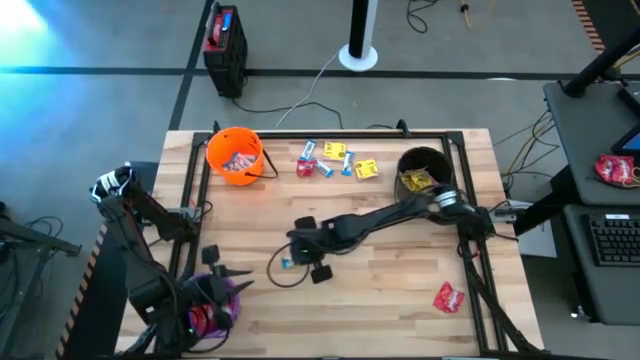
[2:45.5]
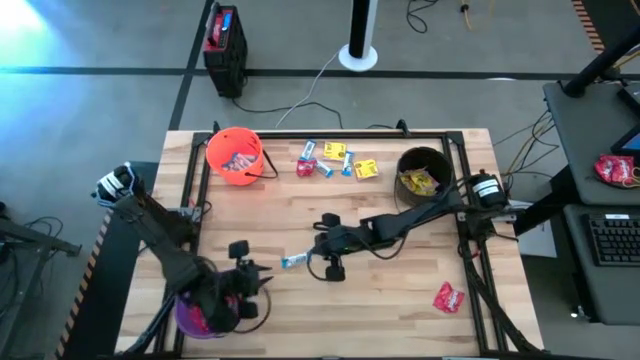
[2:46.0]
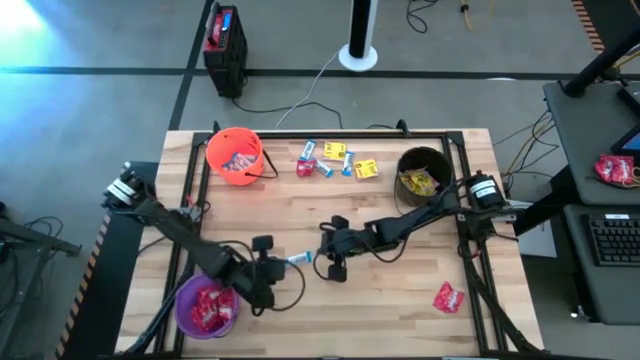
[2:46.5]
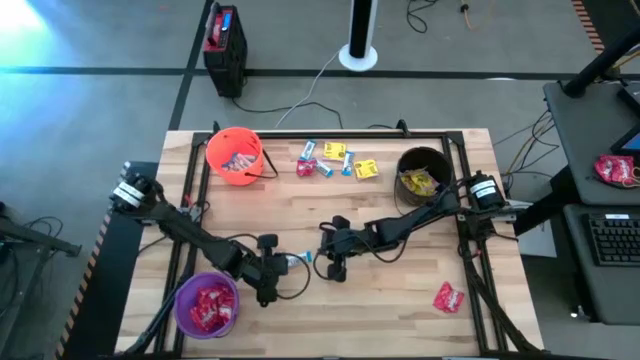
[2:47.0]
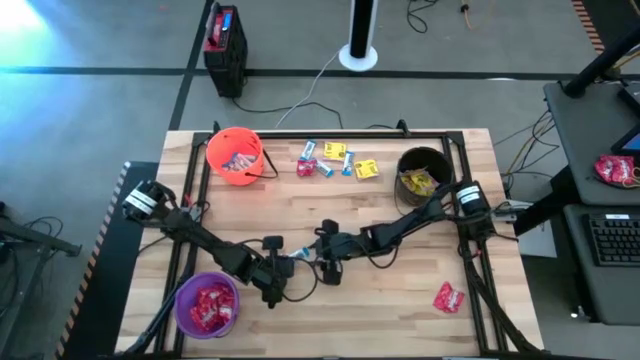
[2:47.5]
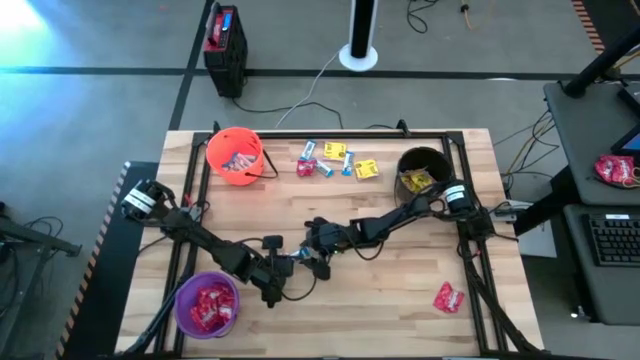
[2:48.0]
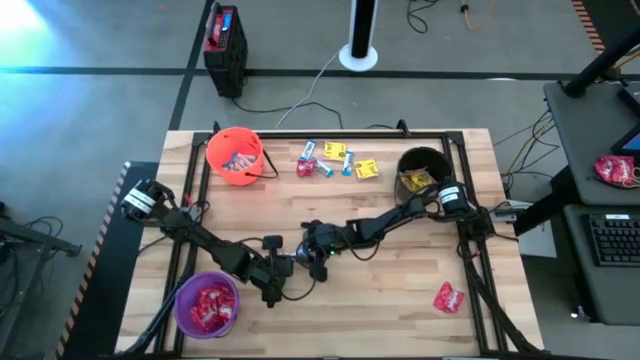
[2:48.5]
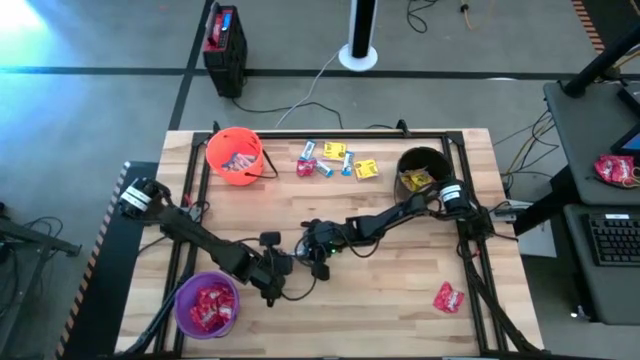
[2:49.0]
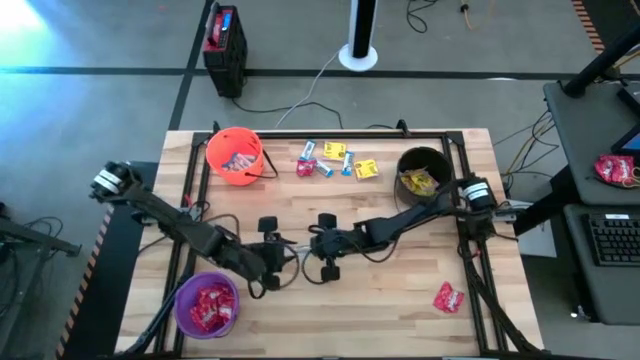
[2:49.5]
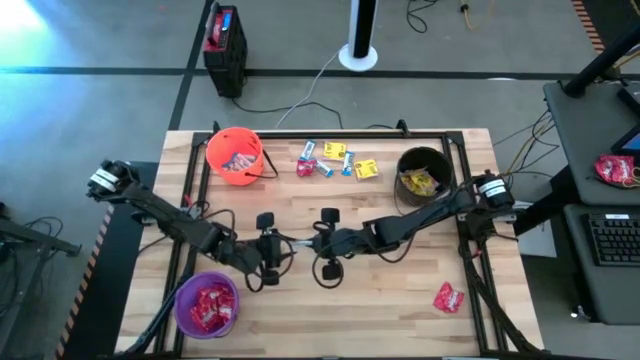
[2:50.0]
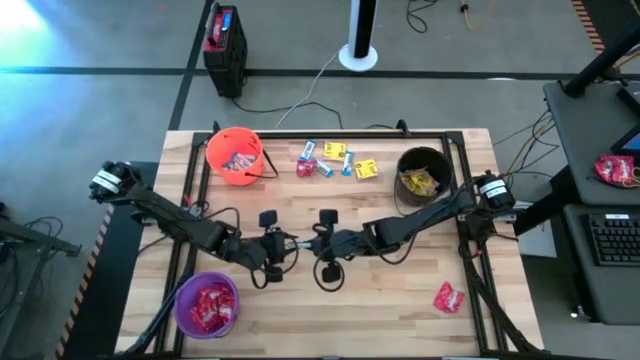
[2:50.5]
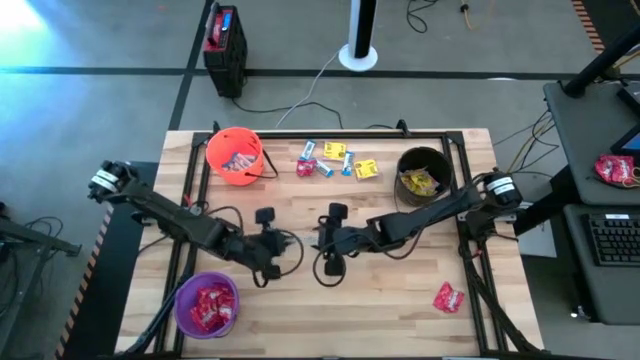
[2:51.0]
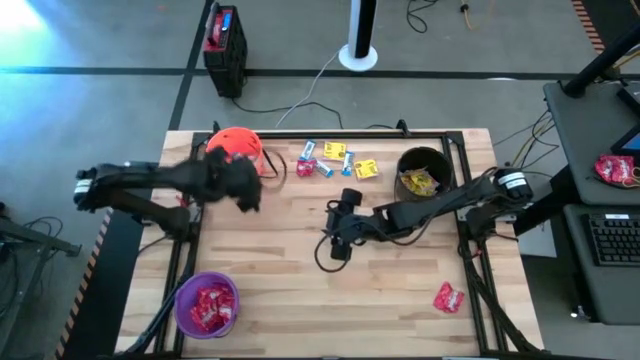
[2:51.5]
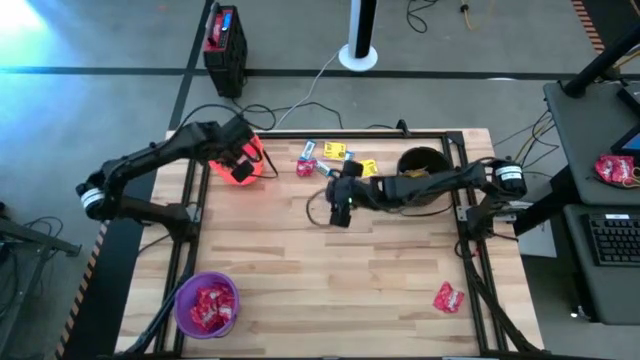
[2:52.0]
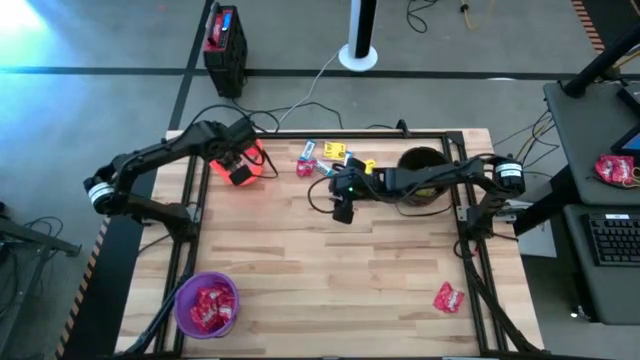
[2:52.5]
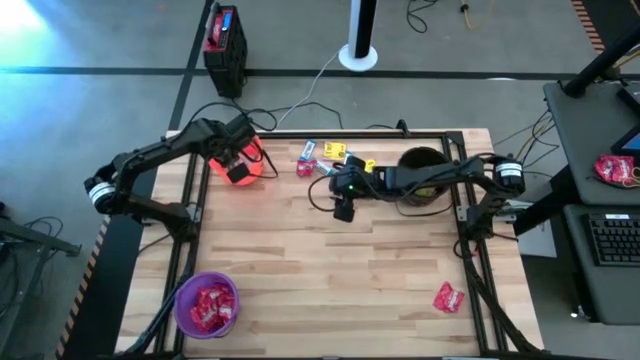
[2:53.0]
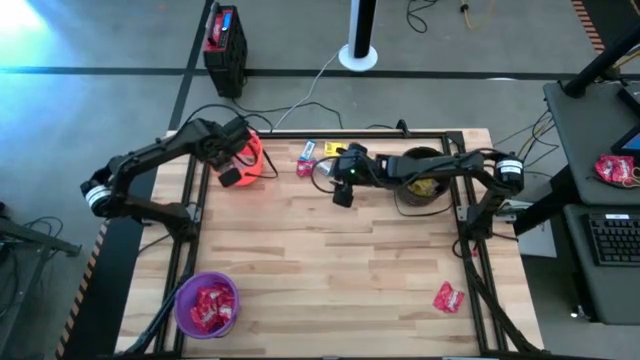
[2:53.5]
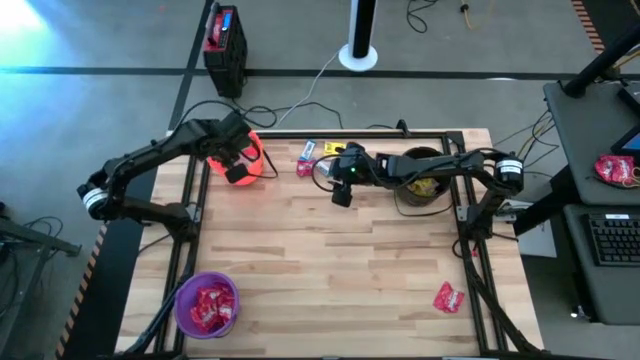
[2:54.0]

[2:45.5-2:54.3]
Task: Sort candy by brand, put in halloween buckets
Put the white chocolate bar into the orange bucket

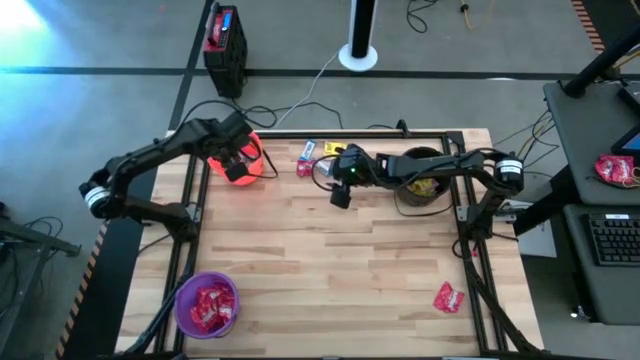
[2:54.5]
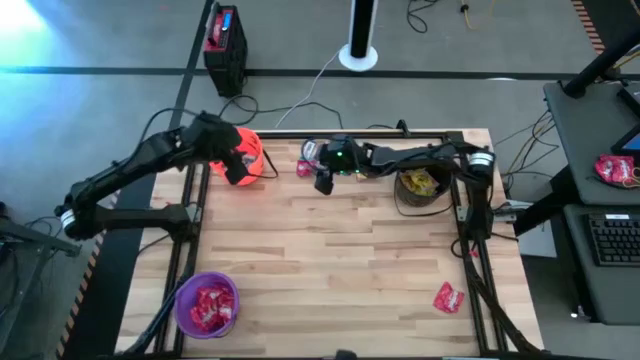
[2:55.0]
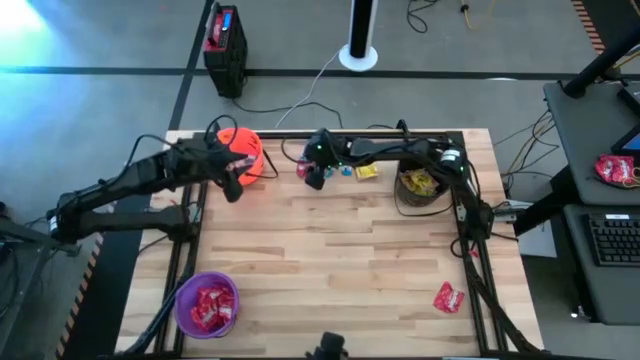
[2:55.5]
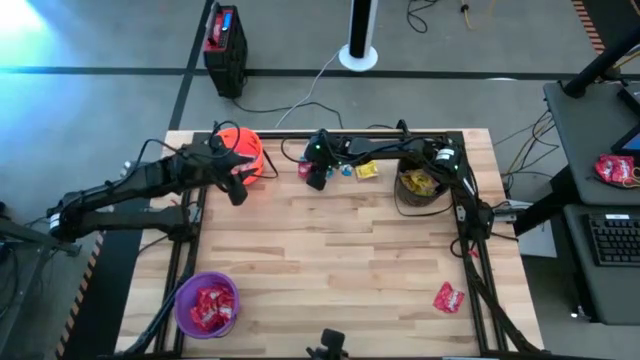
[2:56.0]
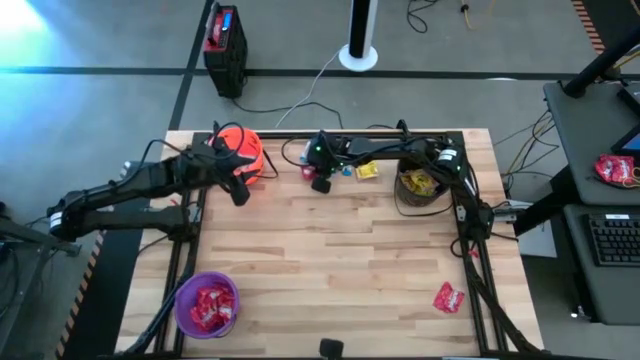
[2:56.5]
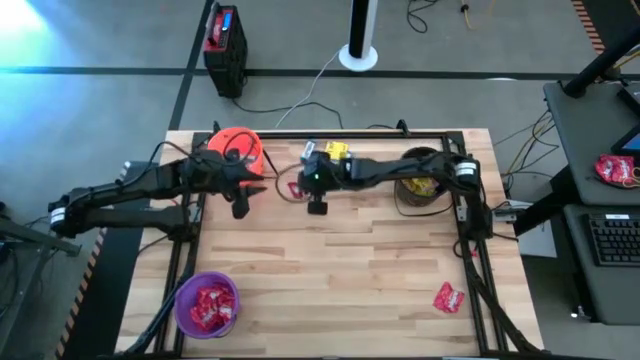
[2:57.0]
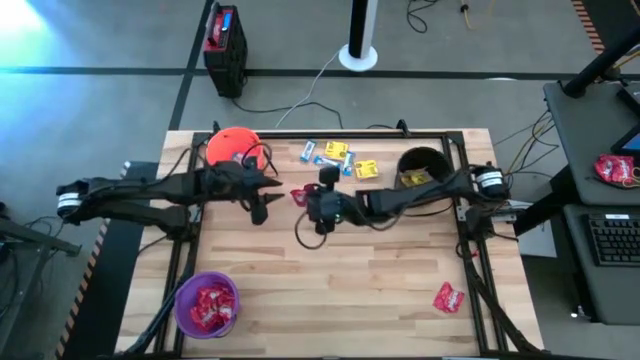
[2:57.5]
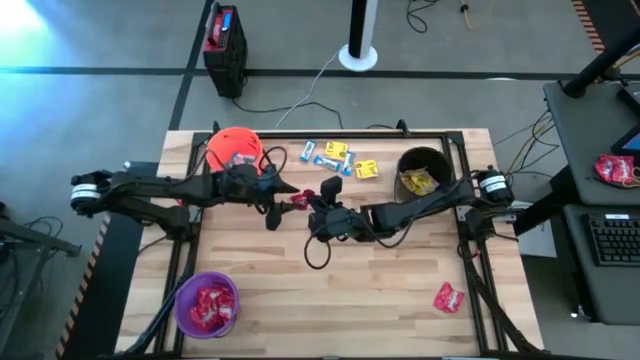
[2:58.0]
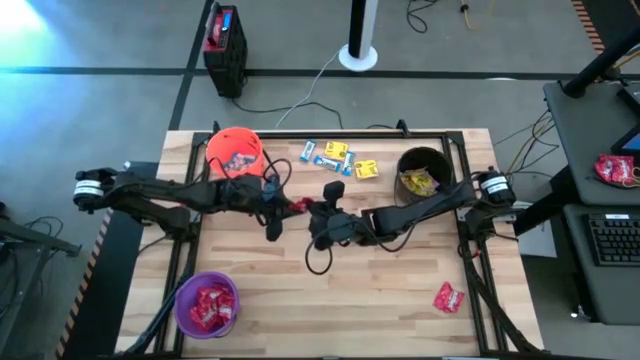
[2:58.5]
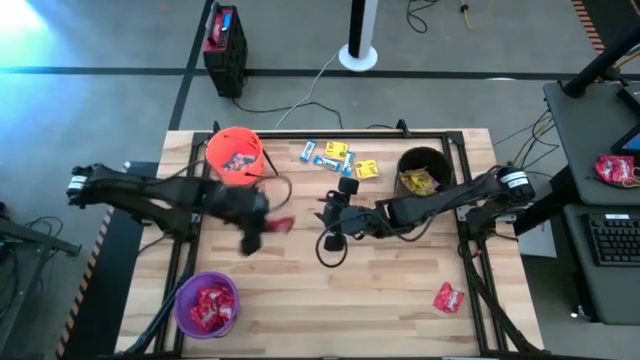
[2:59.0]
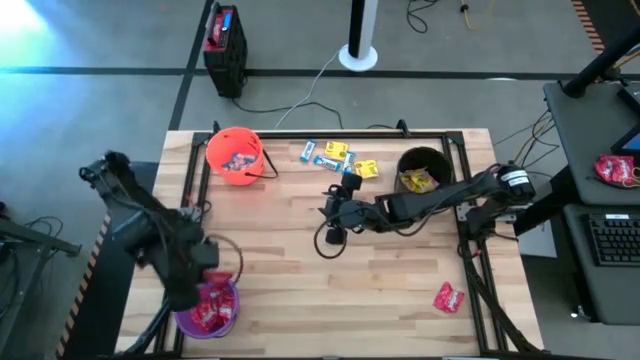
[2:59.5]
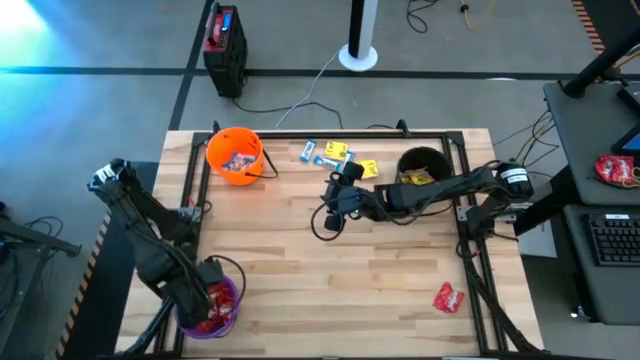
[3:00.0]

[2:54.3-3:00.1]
Put the red candy into the purple bucket

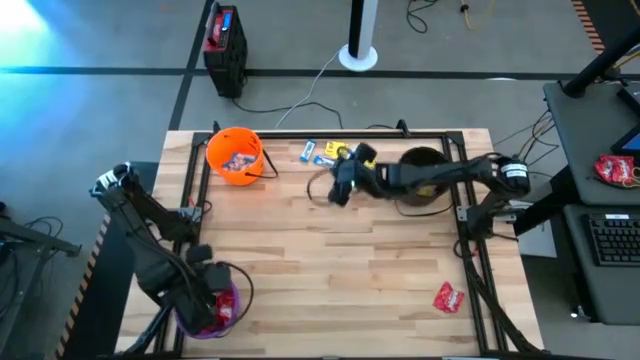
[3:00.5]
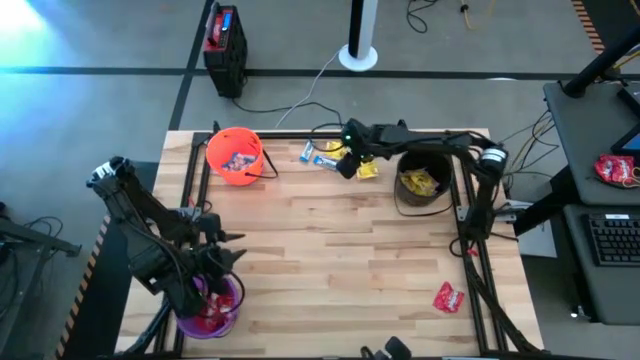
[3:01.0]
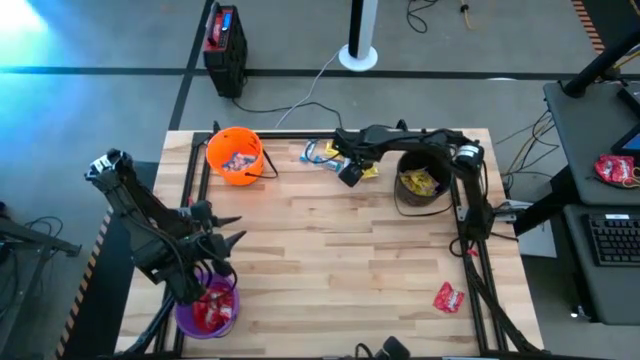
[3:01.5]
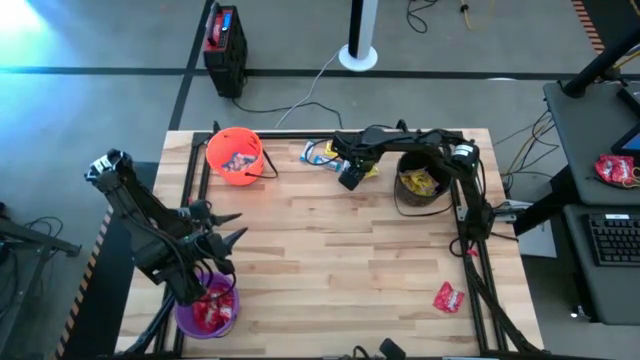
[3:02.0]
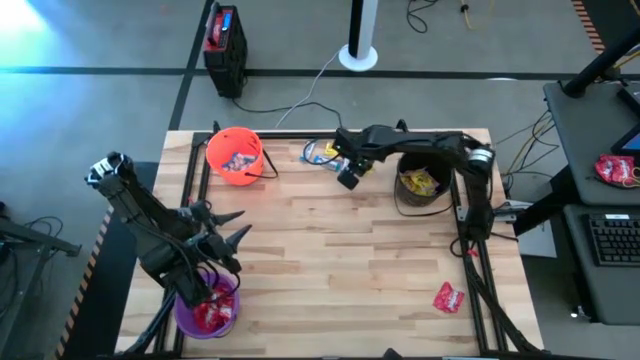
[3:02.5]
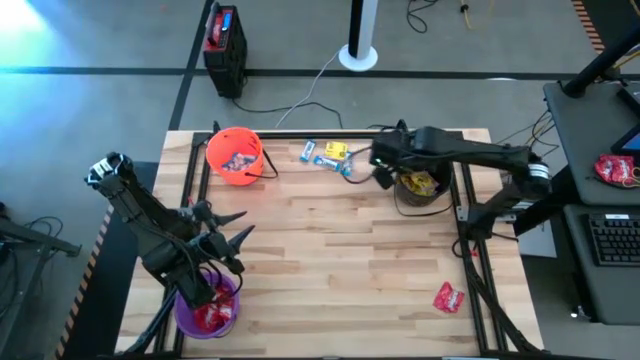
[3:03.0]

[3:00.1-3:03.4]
Put the yellow candy into the black bucket

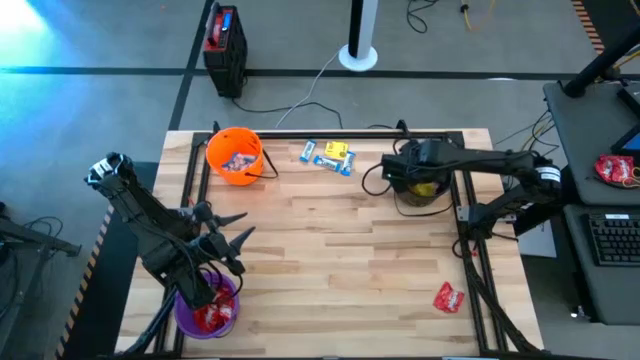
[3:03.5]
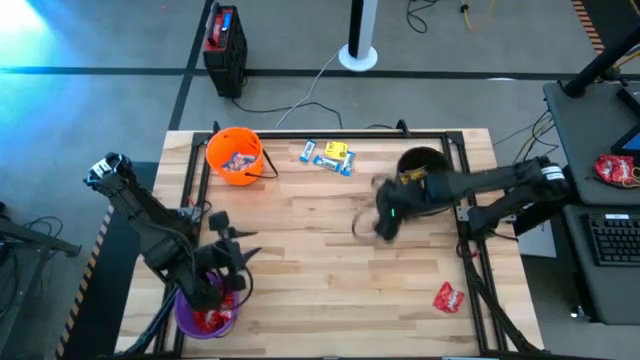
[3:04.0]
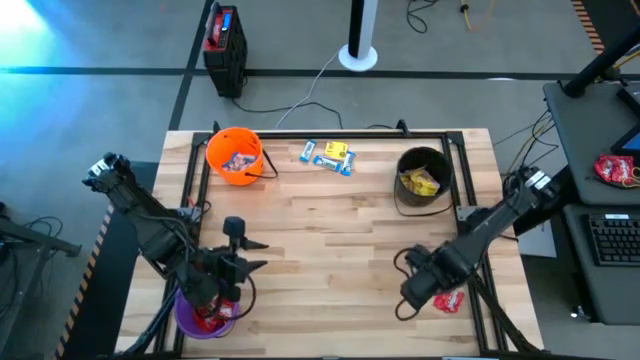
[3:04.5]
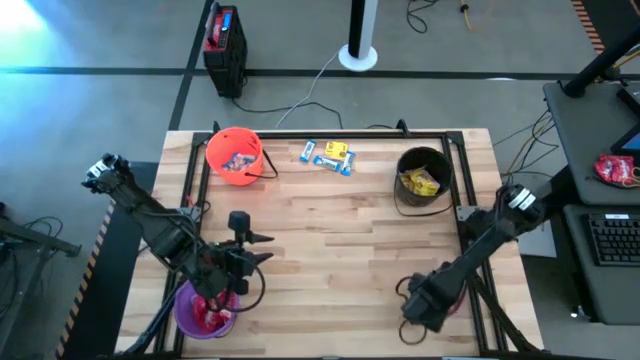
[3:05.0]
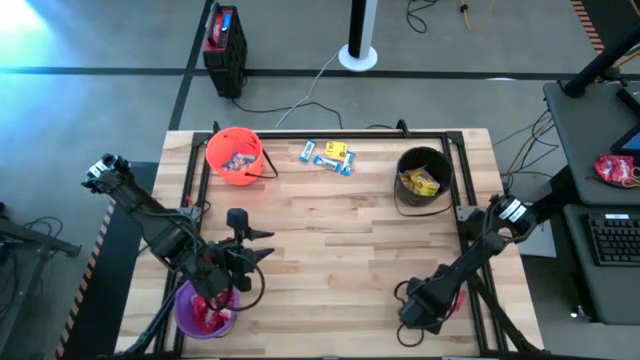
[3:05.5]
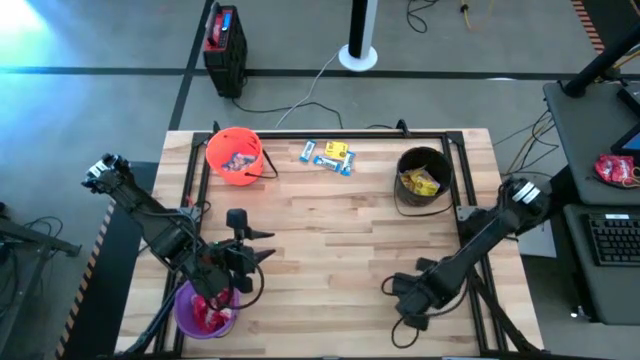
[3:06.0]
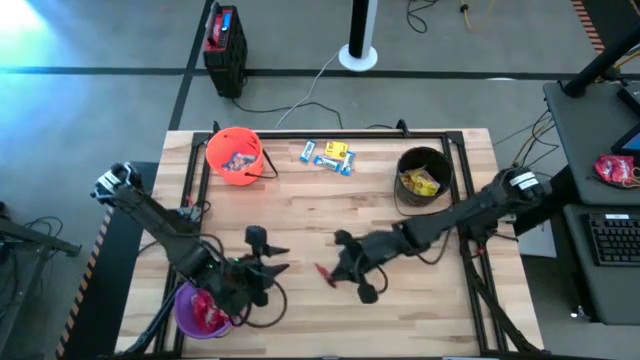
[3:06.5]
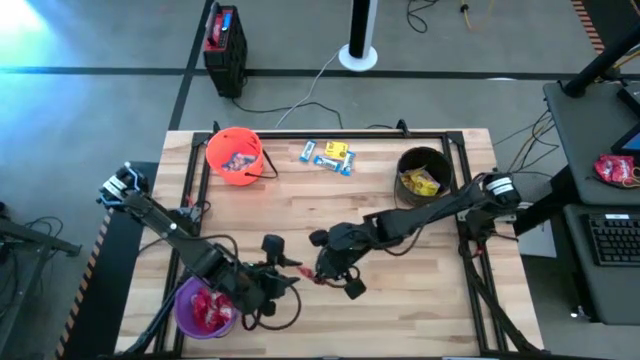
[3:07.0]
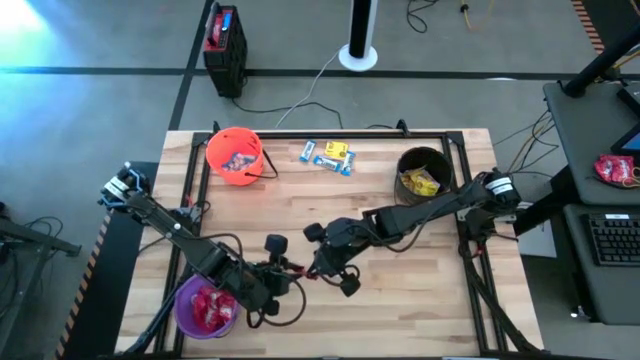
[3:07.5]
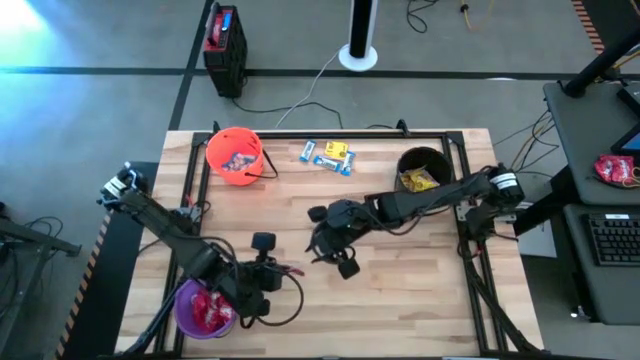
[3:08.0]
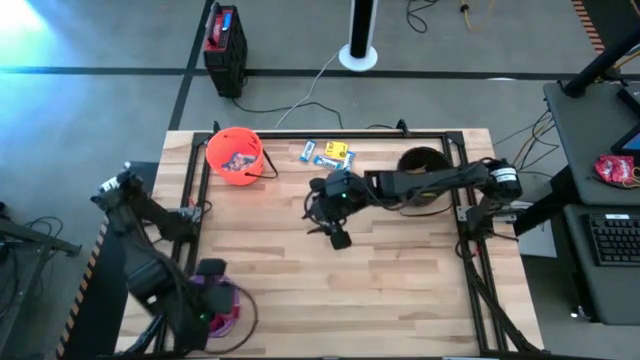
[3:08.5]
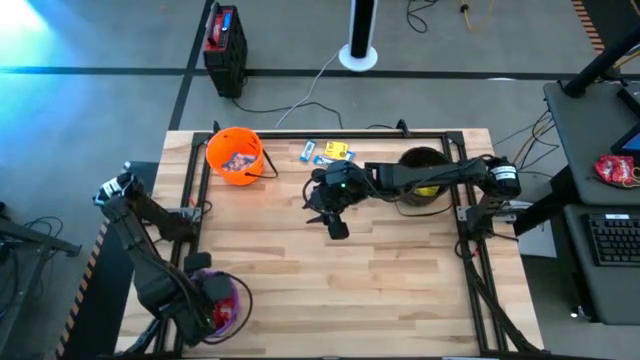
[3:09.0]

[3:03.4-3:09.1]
Put the red candy into the purple bucket
